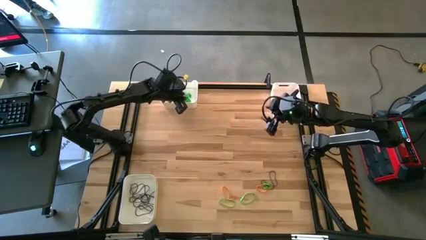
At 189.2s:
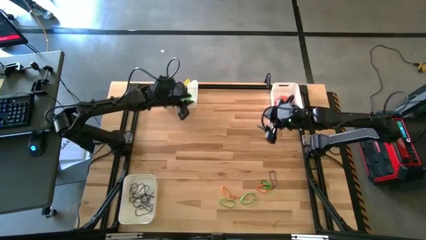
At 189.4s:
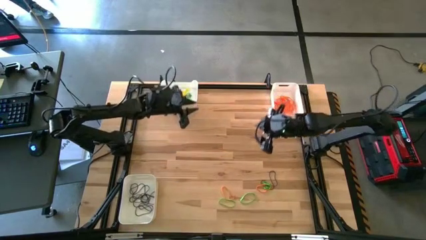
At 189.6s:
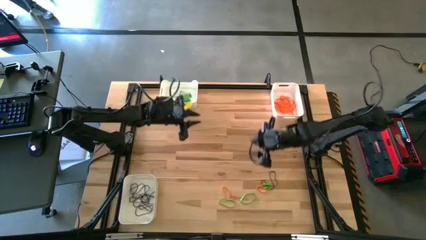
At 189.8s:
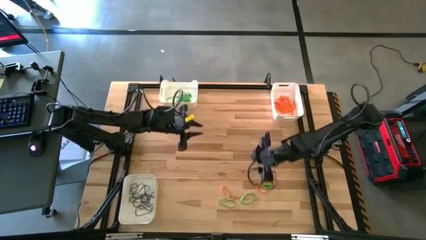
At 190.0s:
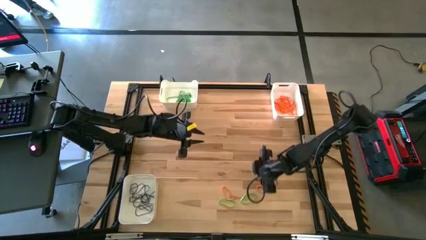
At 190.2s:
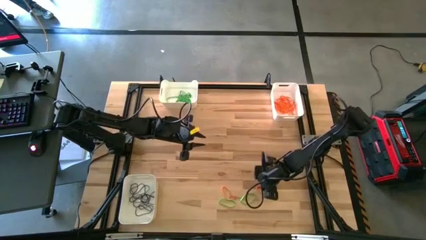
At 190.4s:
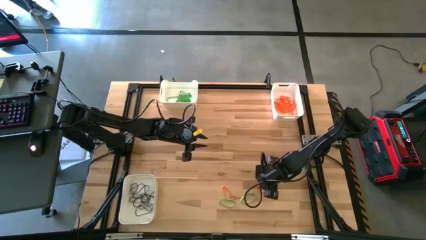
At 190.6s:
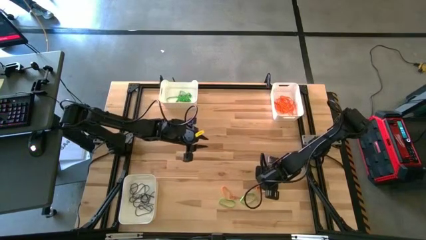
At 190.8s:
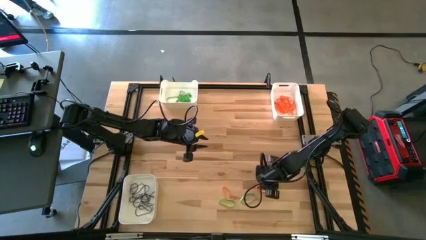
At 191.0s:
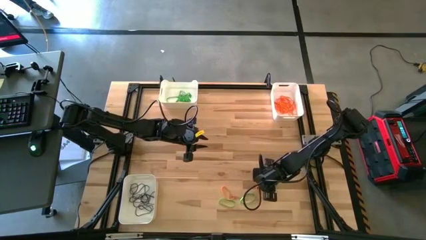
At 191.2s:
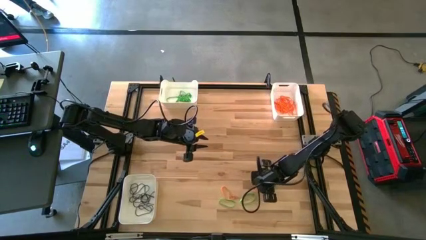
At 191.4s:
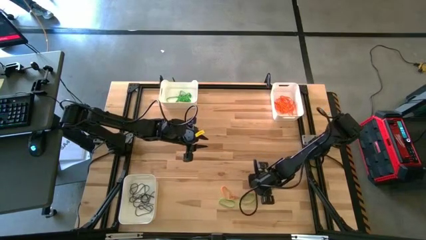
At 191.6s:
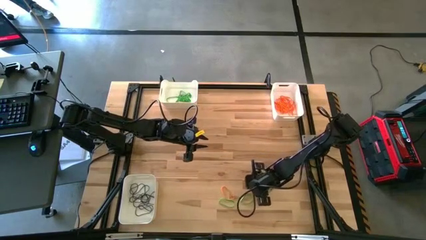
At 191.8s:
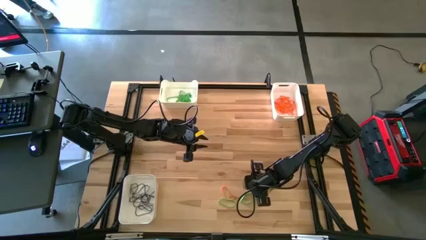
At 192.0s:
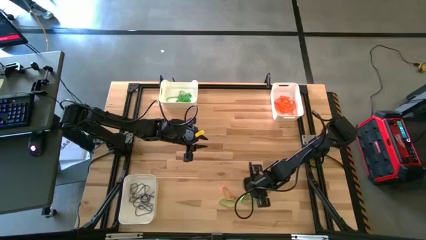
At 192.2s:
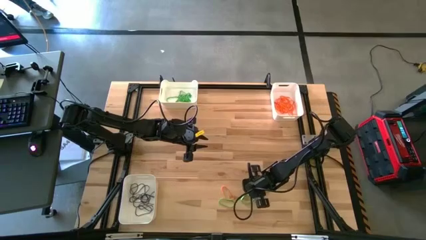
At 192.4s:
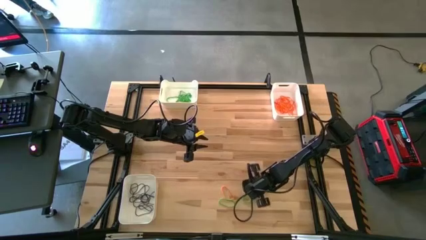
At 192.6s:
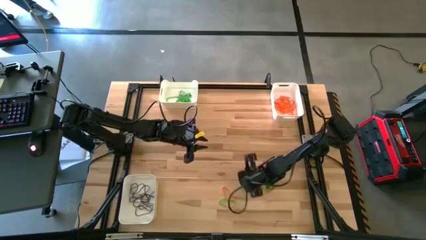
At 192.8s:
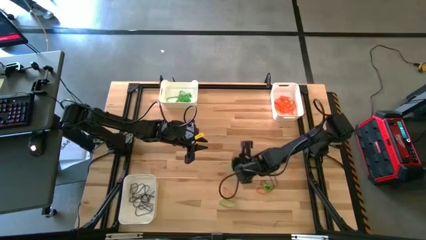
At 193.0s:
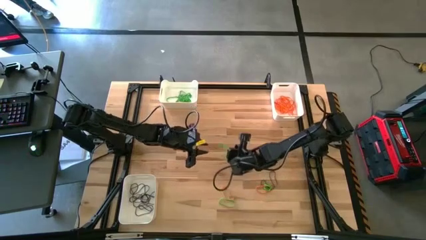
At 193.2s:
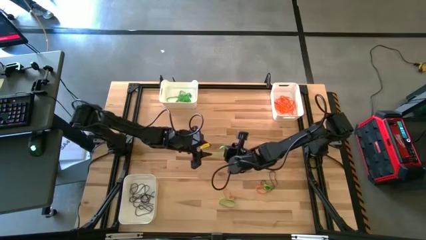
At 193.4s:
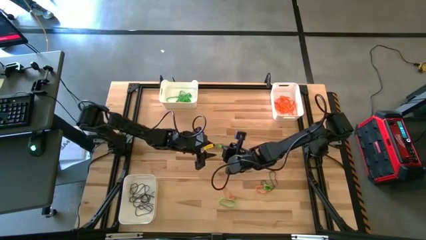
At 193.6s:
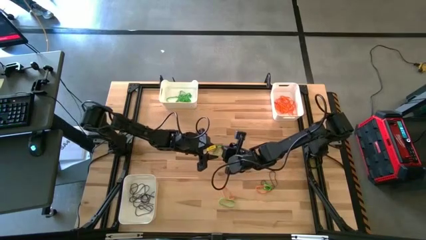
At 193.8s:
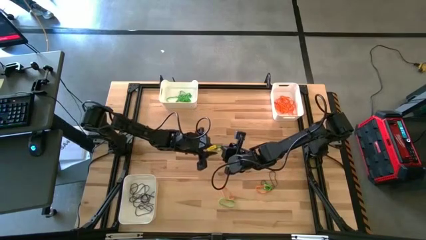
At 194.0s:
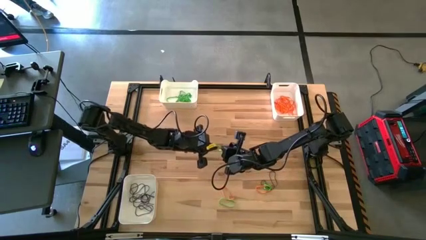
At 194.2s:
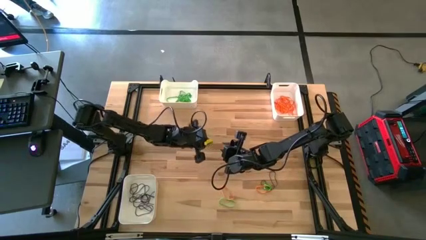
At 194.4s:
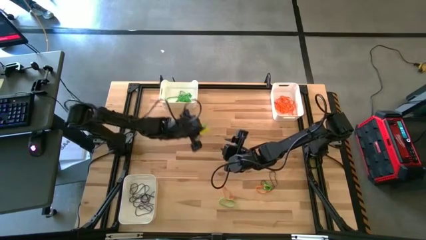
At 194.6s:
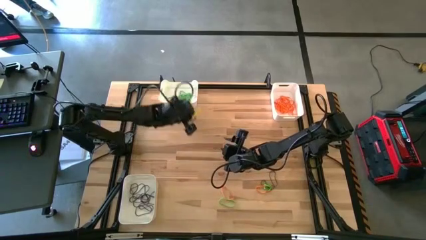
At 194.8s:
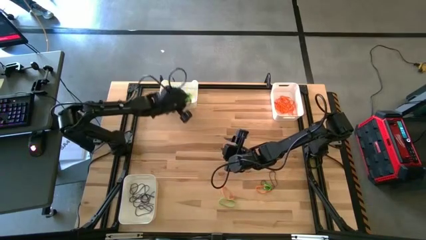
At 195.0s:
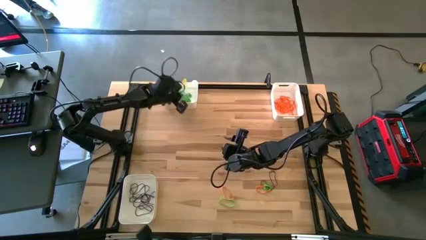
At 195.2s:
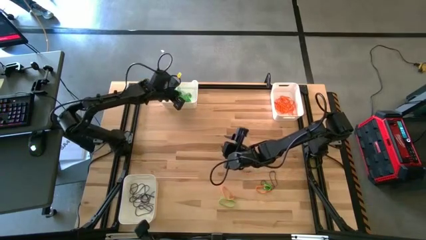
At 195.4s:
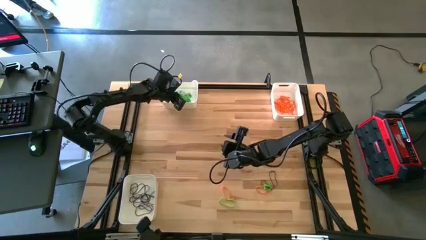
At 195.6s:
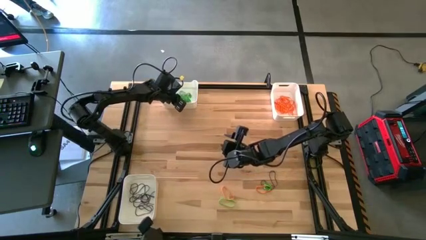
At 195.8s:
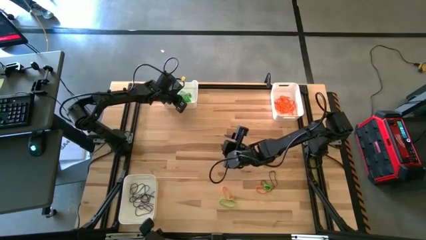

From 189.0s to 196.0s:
Task: Sort rubber bands into baskets
Put the green rubber band into the top left white bin

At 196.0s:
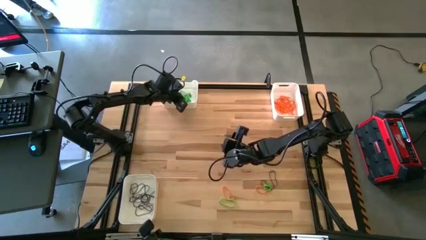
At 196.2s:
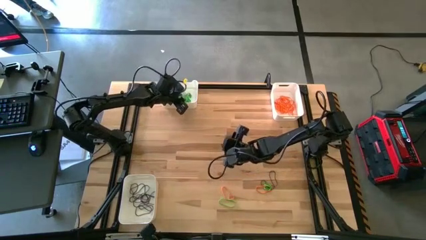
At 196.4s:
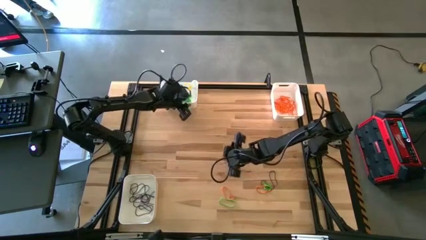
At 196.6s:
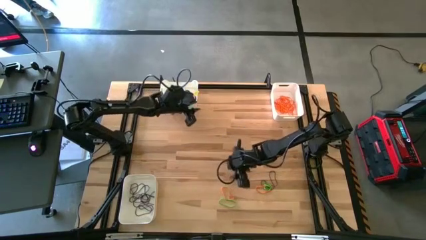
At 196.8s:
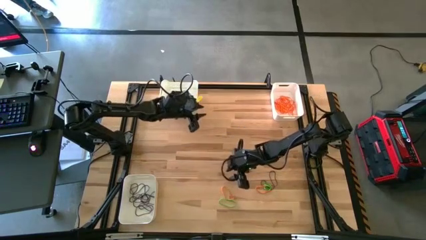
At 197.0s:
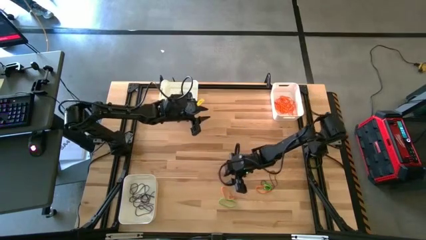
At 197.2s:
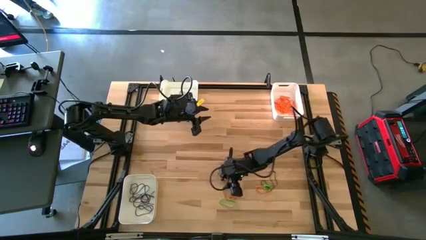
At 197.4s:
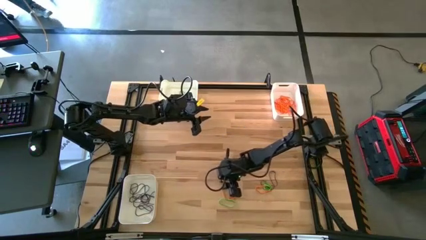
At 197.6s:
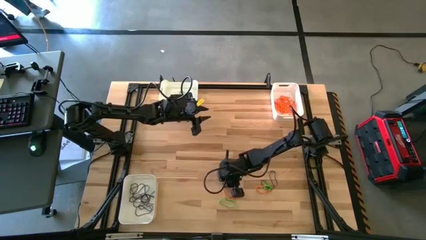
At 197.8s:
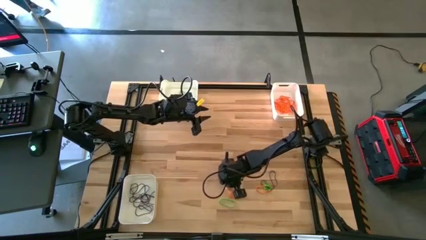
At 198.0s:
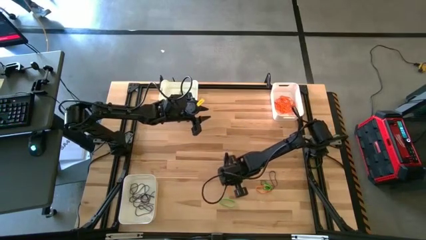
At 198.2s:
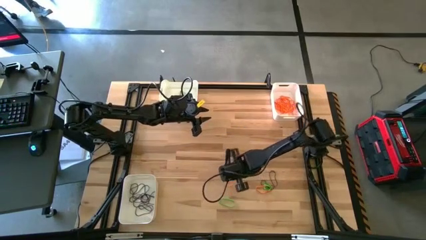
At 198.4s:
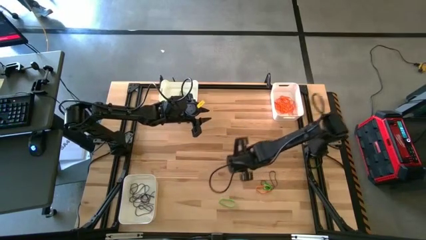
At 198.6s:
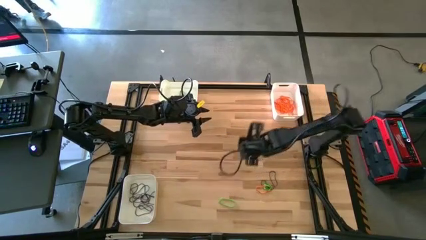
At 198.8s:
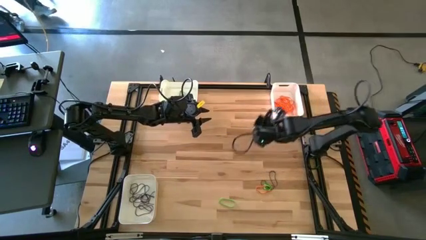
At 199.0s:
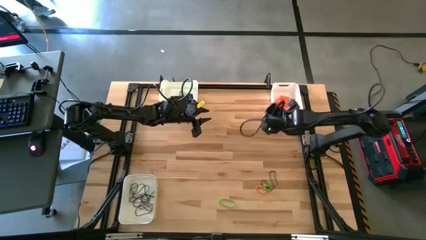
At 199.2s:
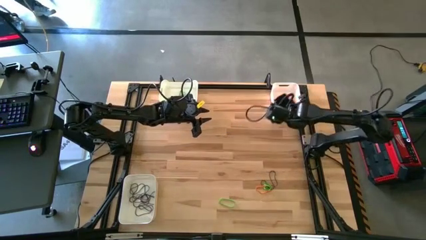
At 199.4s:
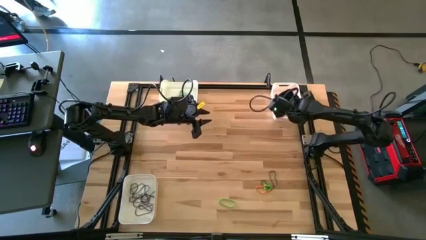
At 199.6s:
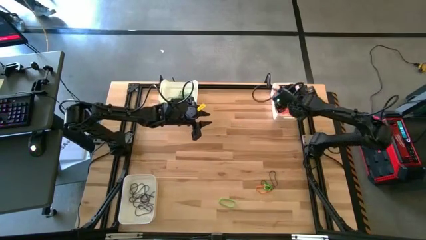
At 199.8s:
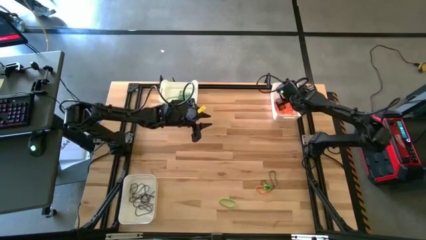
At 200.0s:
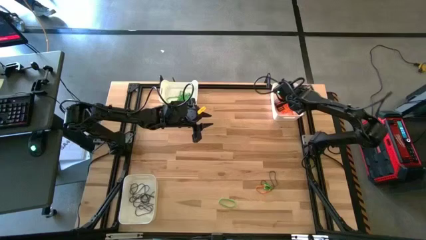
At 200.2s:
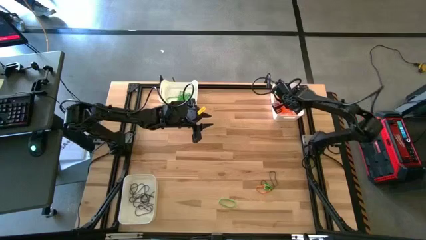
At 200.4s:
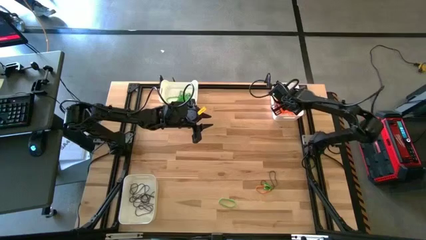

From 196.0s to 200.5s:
Put the orange rubber band into the top right white bin

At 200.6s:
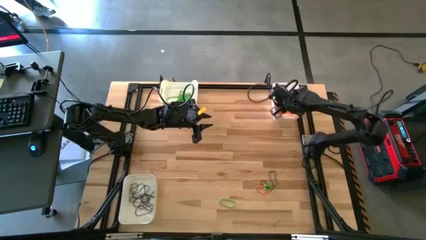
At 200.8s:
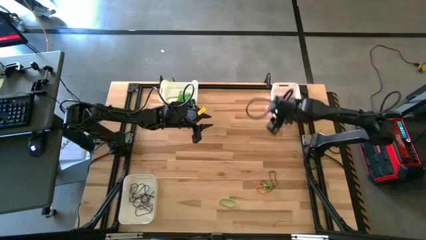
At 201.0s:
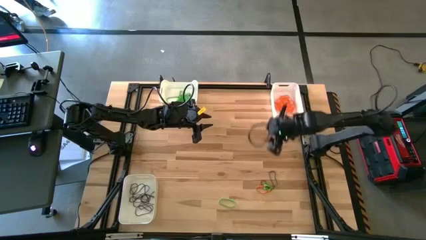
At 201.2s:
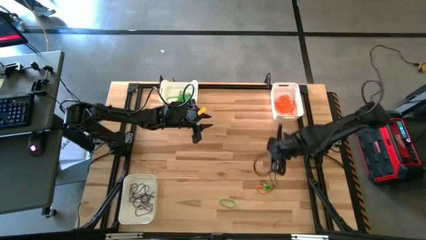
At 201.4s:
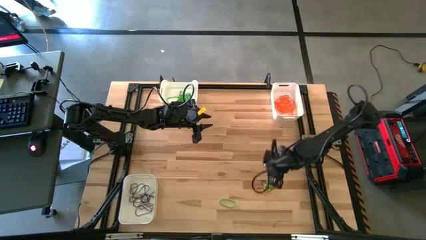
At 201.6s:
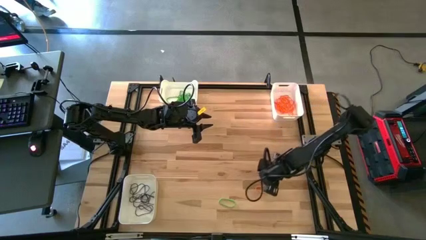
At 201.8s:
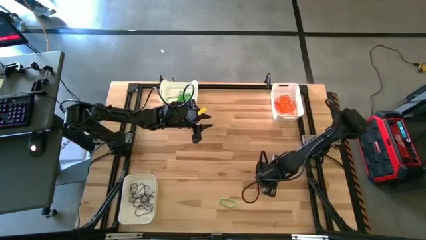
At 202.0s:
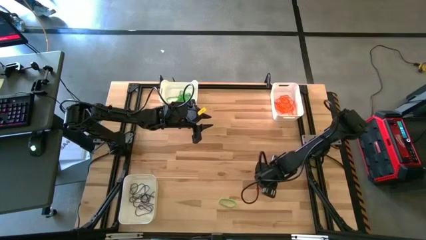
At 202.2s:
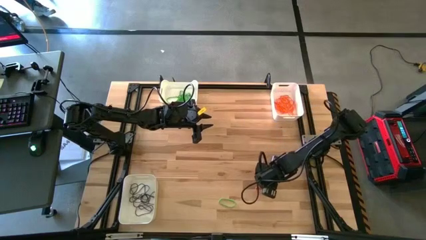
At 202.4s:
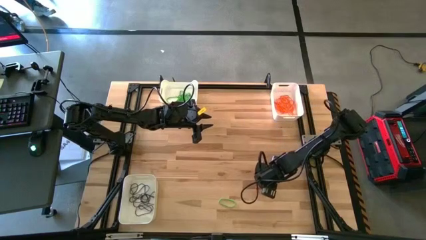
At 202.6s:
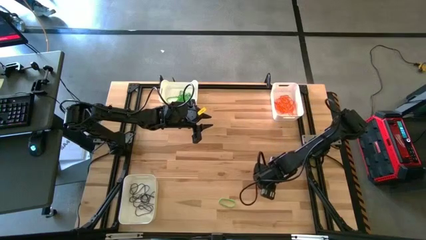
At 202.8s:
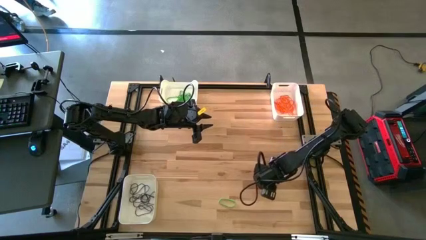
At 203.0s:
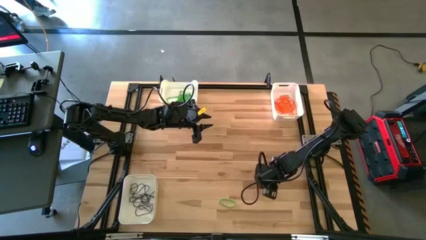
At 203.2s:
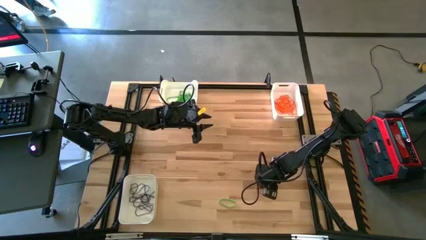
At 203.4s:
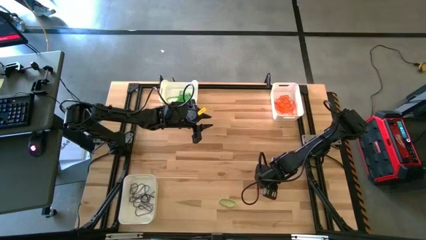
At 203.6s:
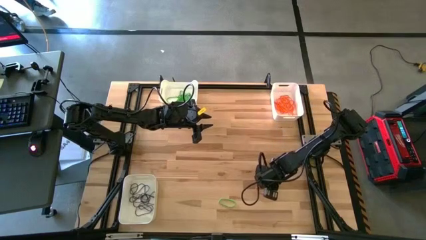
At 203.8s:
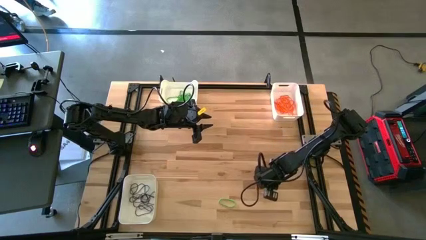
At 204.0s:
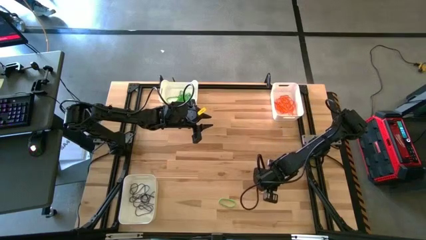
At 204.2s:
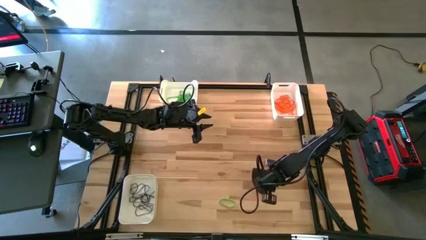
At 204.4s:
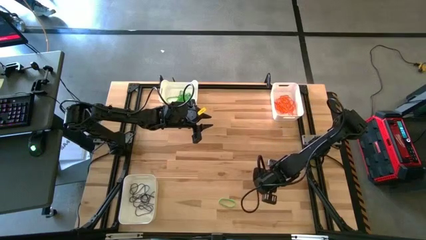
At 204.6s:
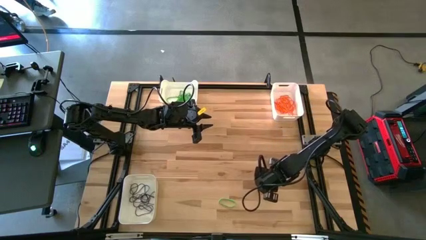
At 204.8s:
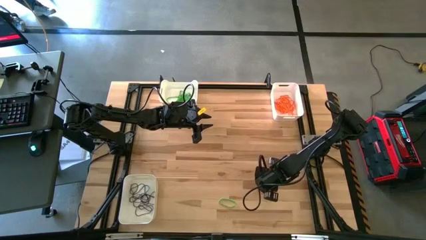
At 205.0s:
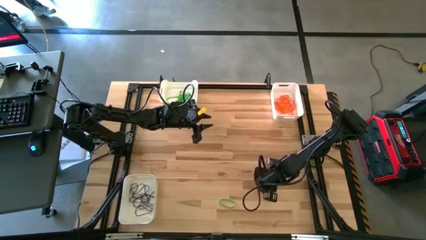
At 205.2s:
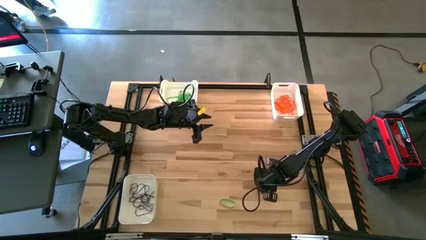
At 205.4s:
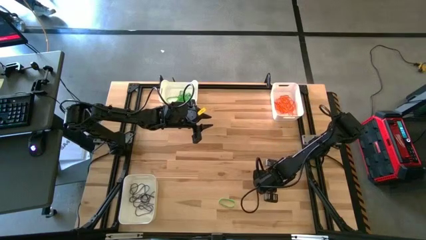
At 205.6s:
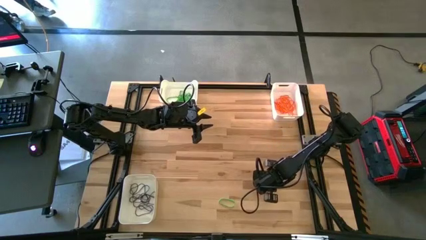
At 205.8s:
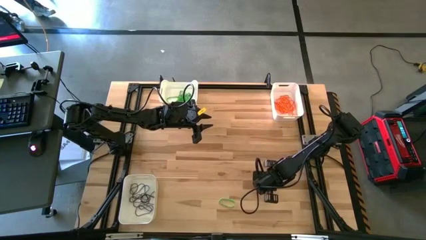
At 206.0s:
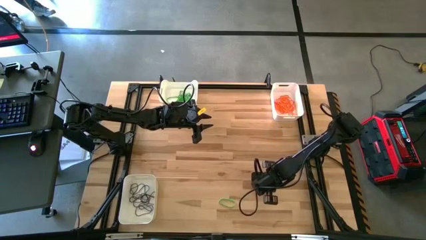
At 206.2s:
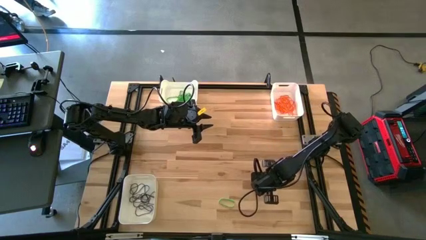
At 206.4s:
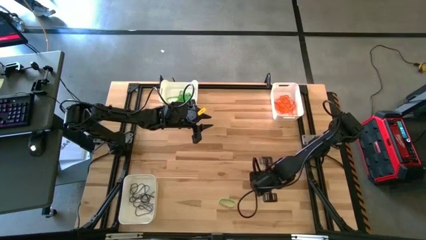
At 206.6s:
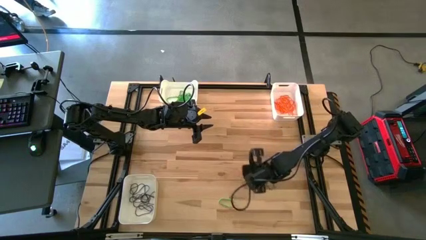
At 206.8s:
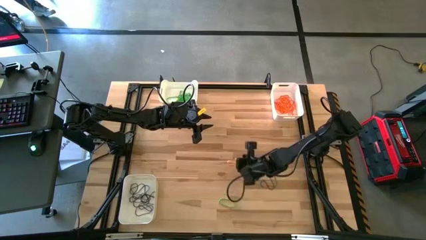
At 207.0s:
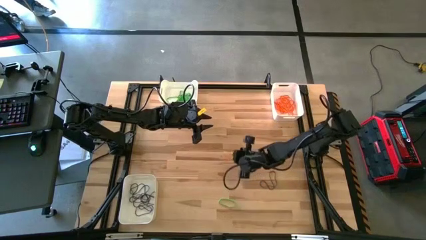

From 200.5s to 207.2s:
Put the green rubber band into the top left white bin
